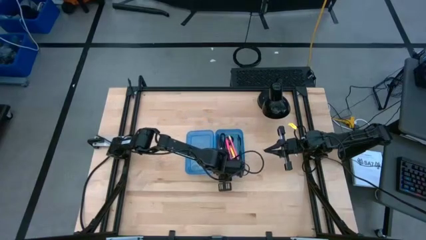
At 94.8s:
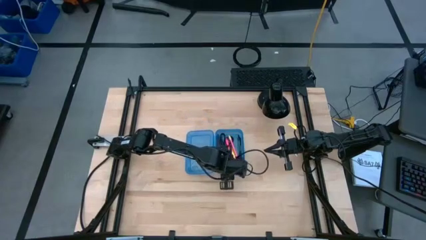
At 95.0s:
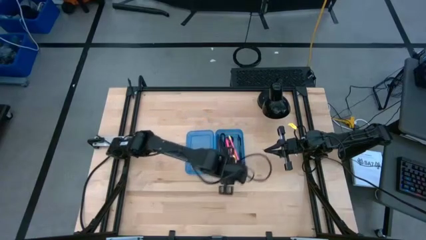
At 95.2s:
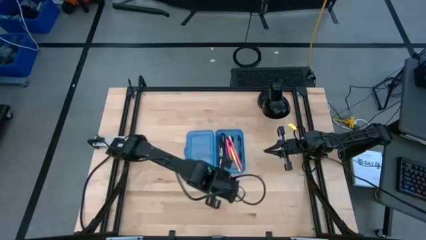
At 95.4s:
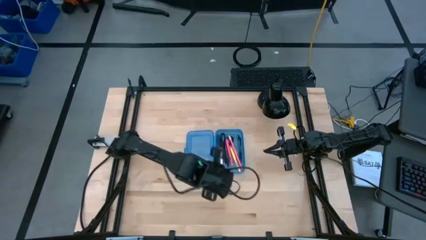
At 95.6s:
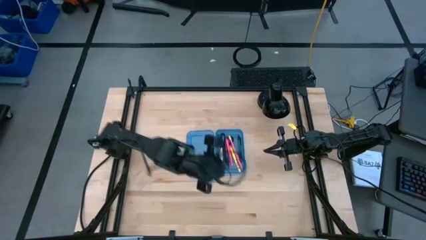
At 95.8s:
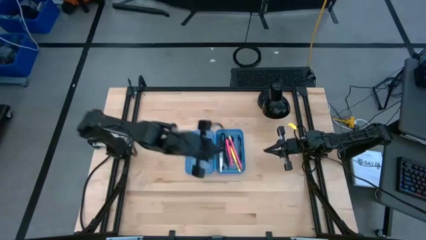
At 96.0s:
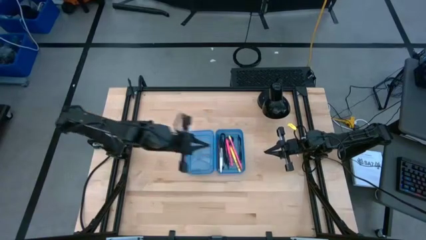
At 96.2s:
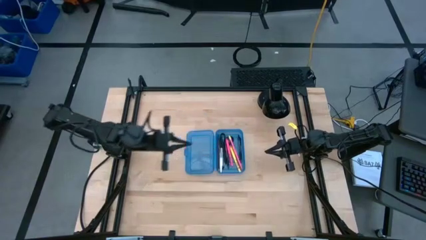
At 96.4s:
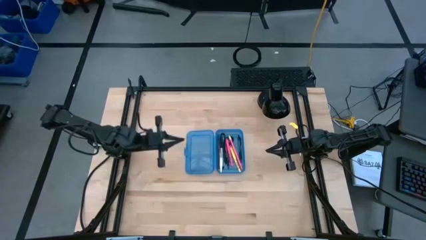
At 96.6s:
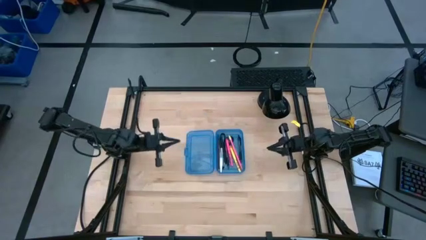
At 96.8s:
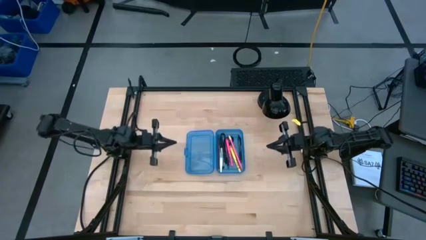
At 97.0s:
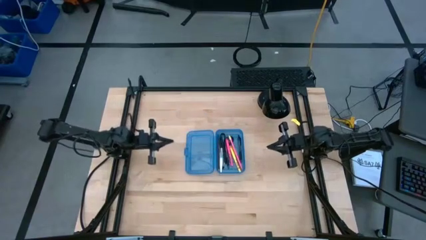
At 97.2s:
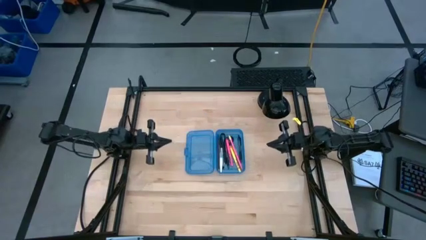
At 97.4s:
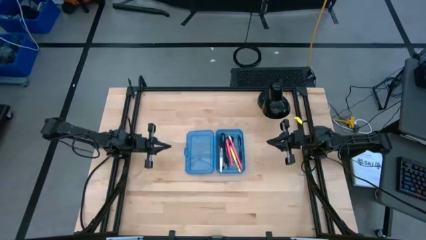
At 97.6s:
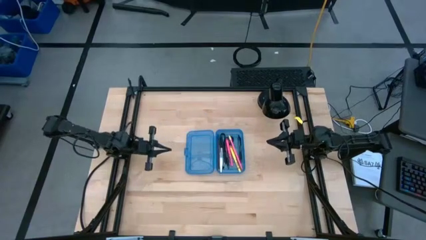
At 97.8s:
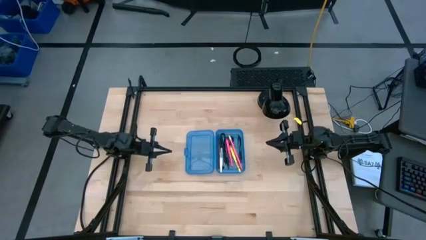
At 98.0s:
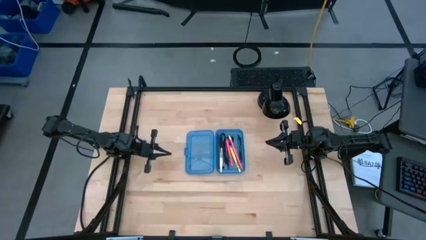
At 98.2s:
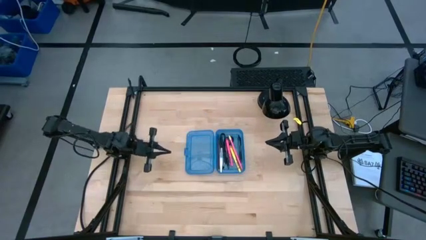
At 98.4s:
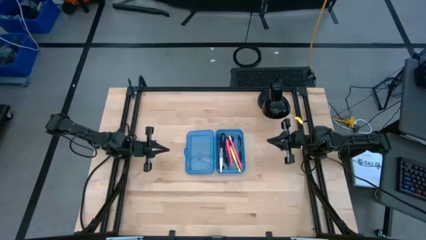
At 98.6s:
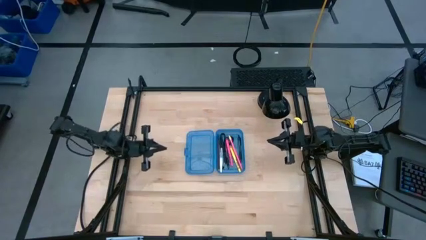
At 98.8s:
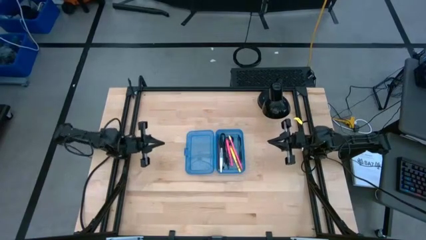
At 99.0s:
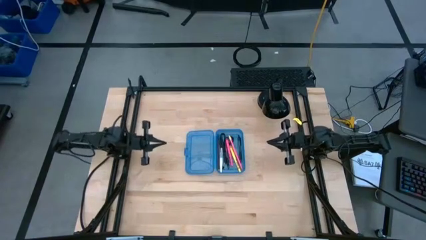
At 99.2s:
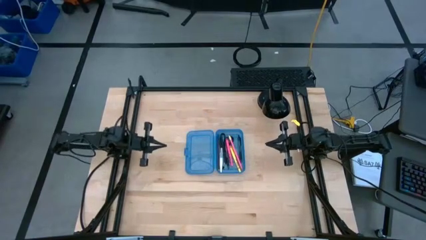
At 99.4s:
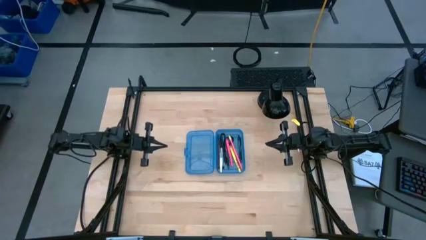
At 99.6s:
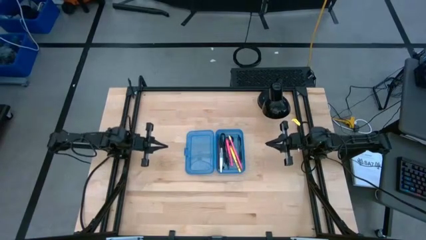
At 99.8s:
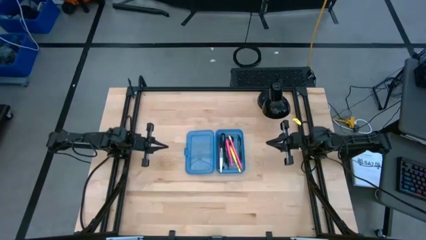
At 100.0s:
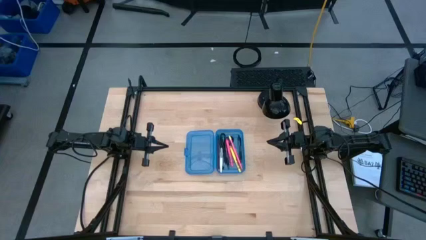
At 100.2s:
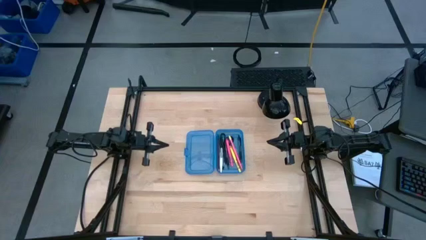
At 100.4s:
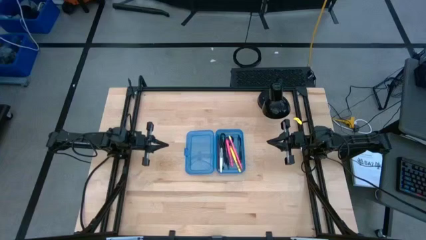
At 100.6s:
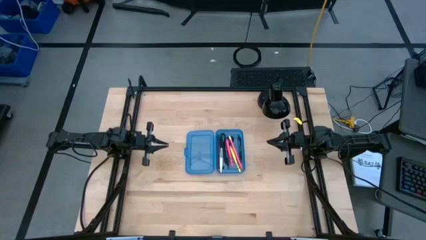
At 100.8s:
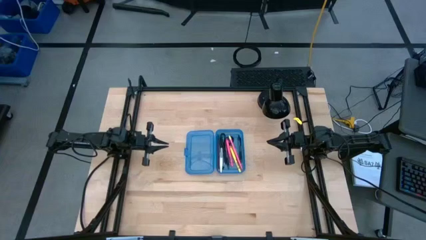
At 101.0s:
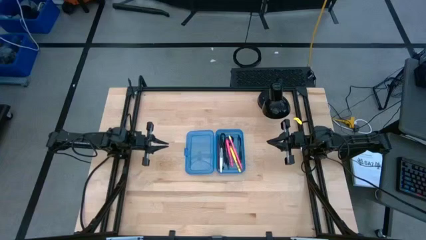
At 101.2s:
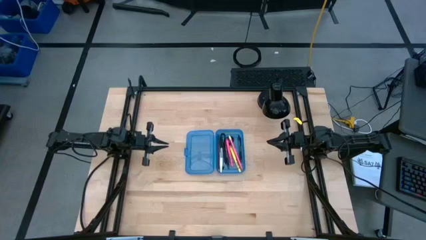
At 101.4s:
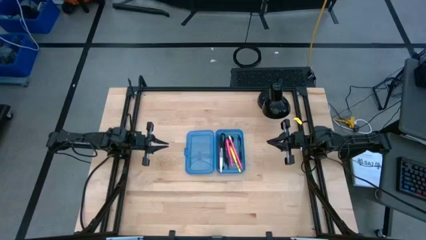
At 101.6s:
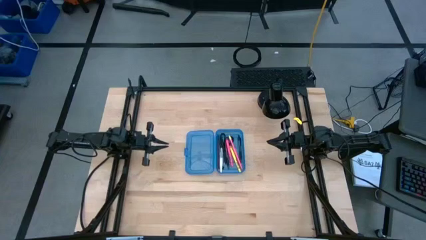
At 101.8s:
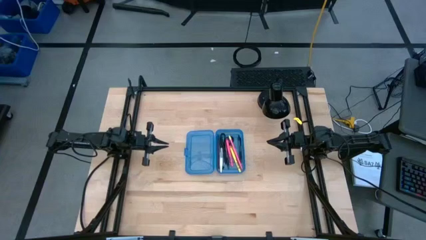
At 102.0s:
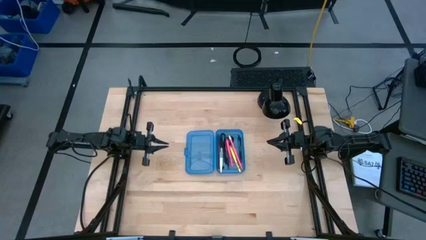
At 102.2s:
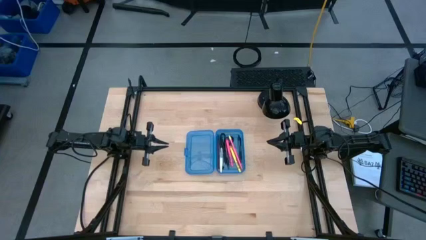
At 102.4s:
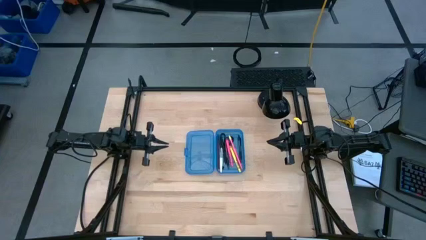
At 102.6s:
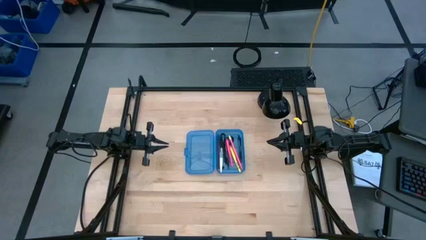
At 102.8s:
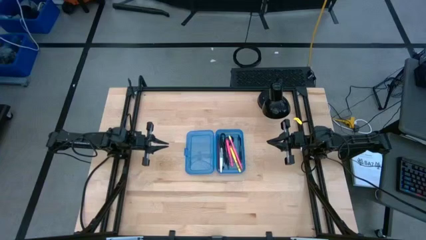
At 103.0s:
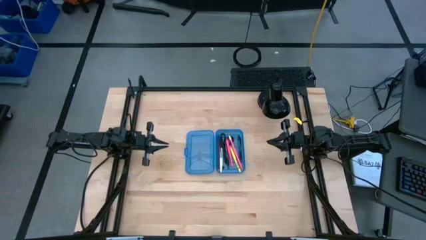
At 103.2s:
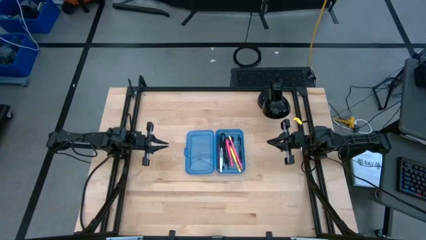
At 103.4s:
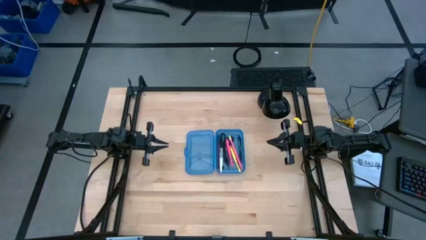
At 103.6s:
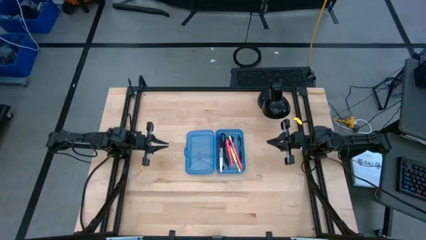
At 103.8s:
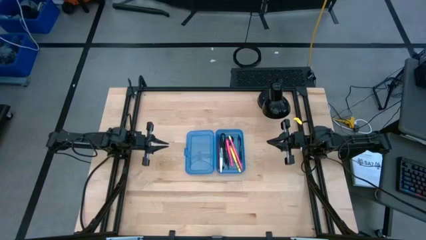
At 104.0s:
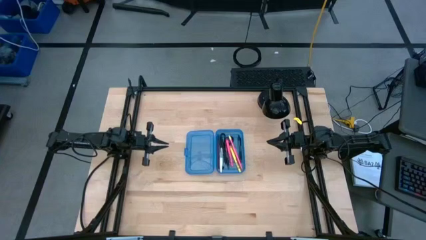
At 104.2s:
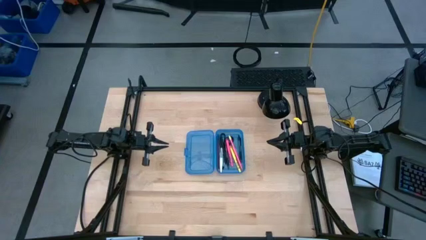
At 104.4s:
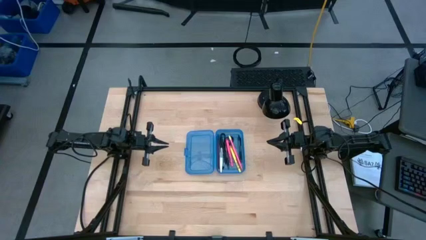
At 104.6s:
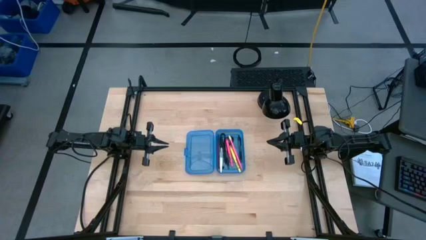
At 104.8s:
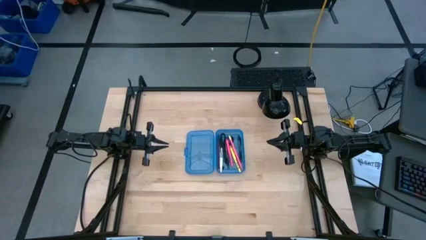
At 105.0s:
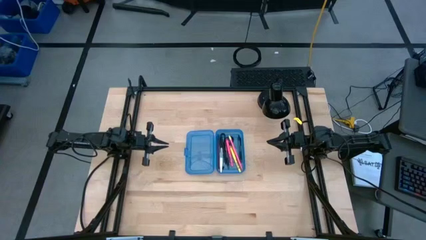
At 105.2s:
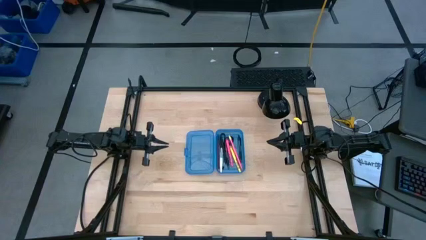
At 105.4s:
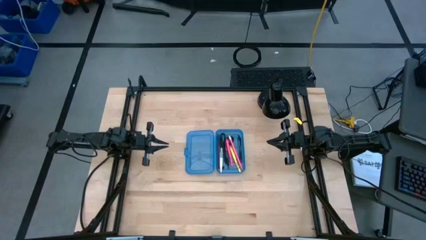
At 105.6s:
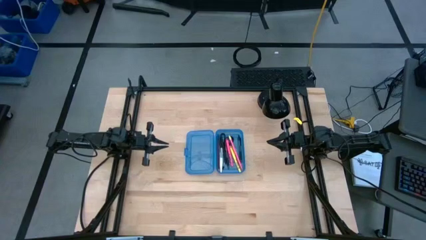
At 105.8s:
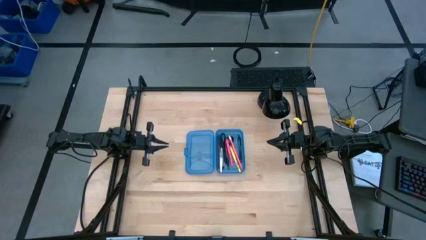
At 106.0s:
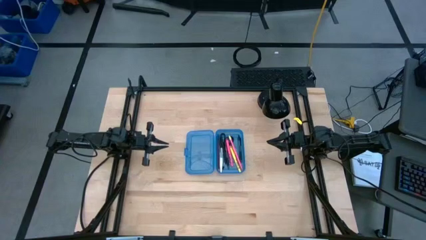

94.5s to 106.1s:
Task: Pick & place school supplies into a supply box
Return to Home Position
